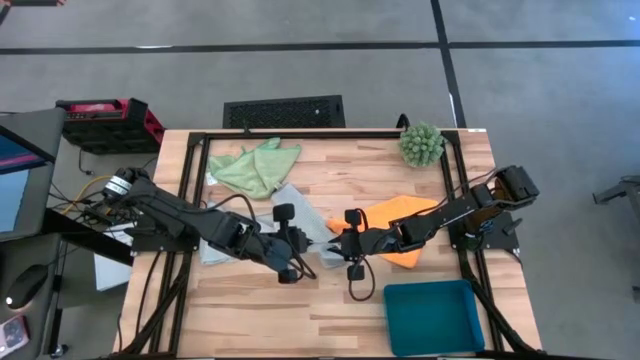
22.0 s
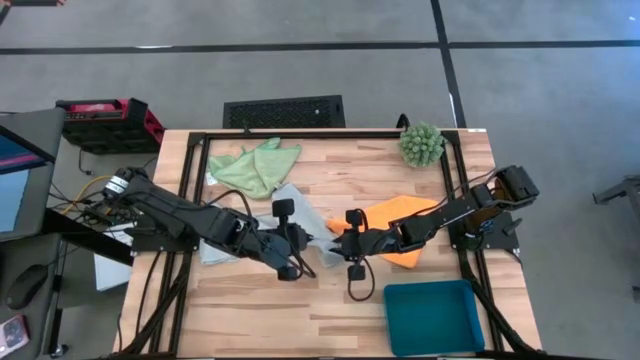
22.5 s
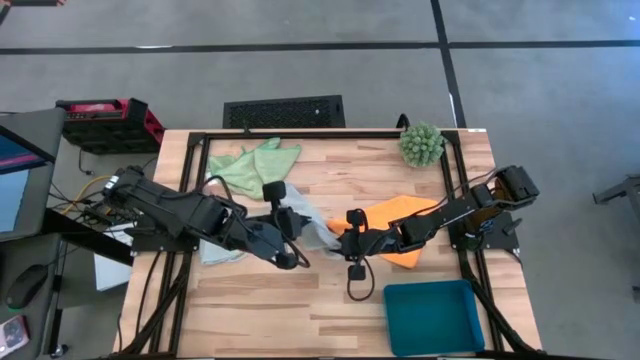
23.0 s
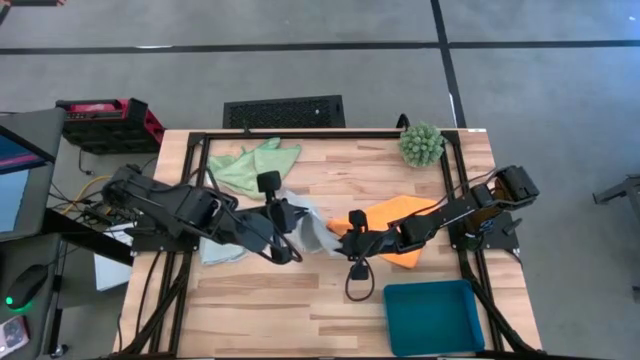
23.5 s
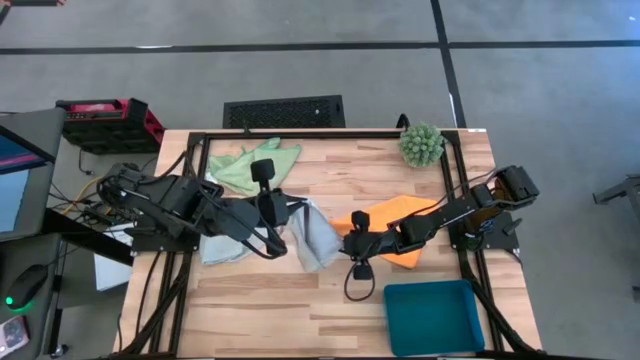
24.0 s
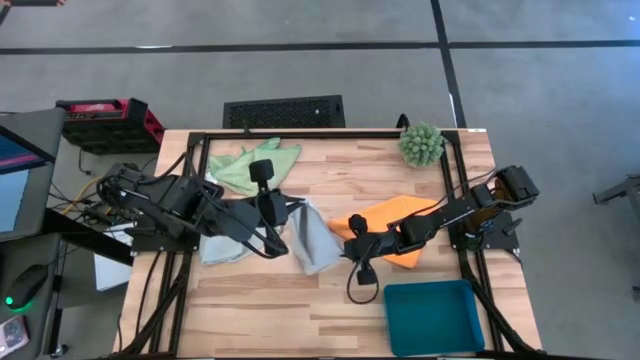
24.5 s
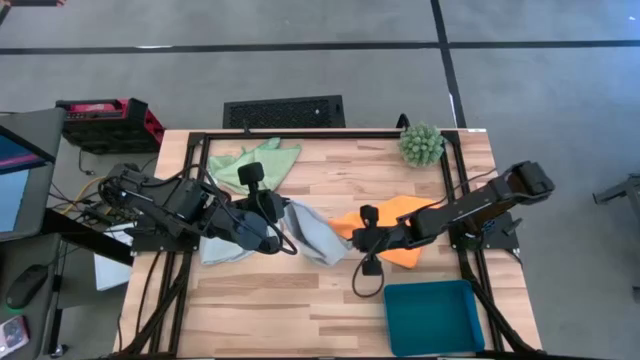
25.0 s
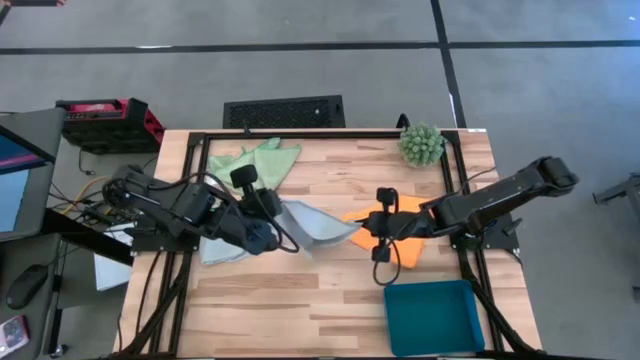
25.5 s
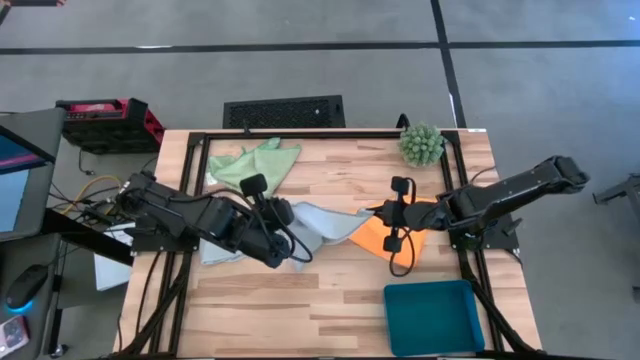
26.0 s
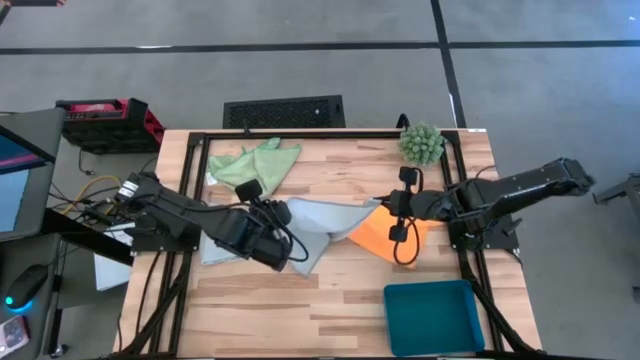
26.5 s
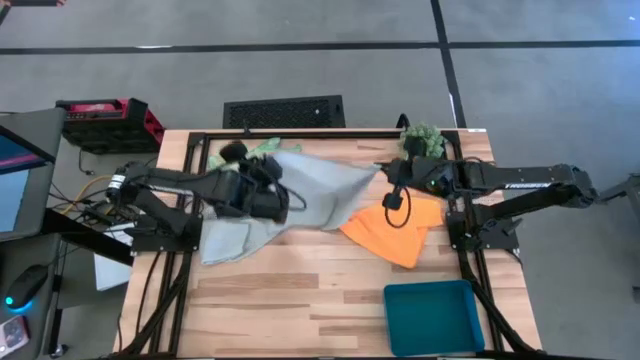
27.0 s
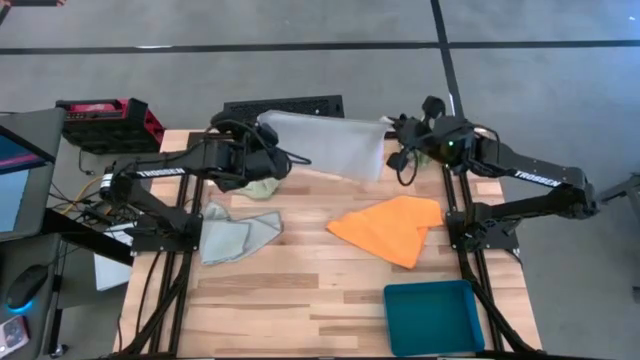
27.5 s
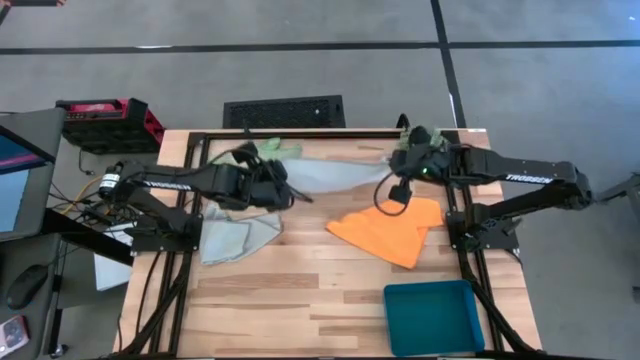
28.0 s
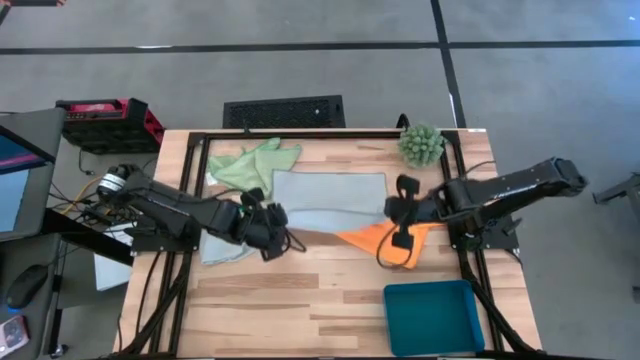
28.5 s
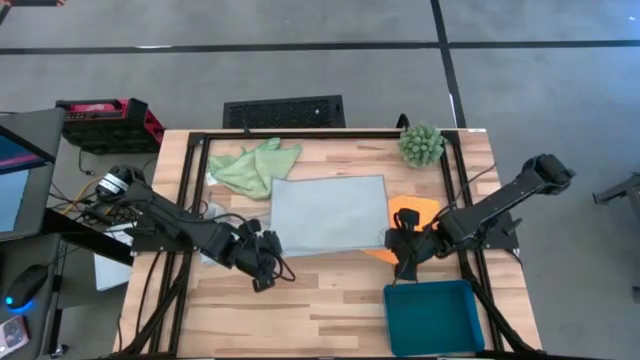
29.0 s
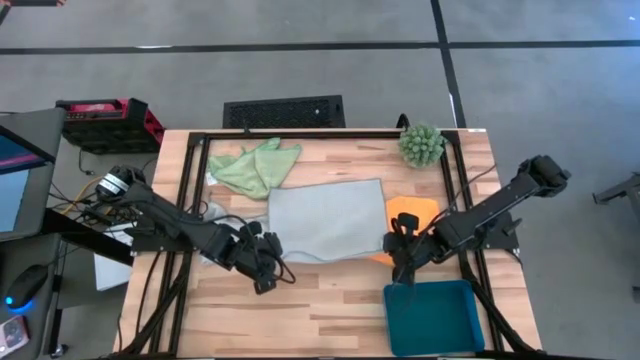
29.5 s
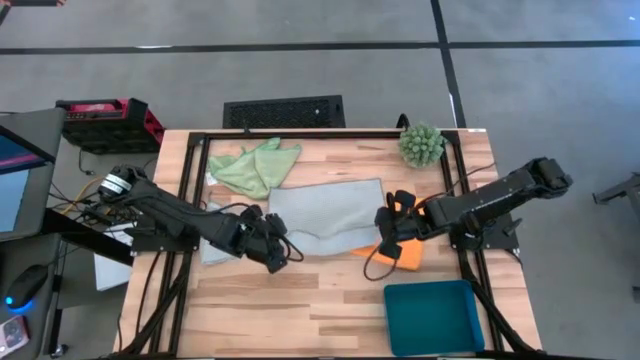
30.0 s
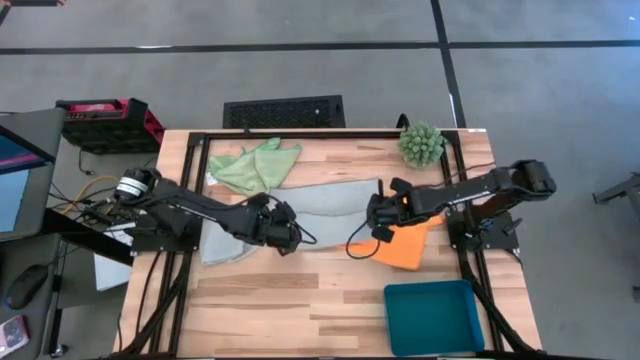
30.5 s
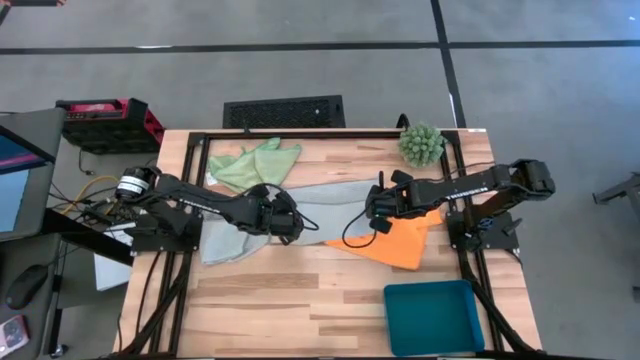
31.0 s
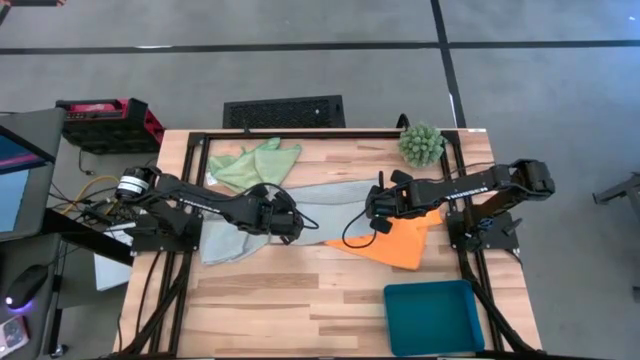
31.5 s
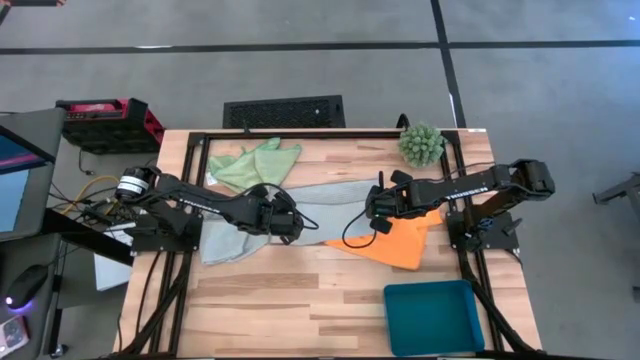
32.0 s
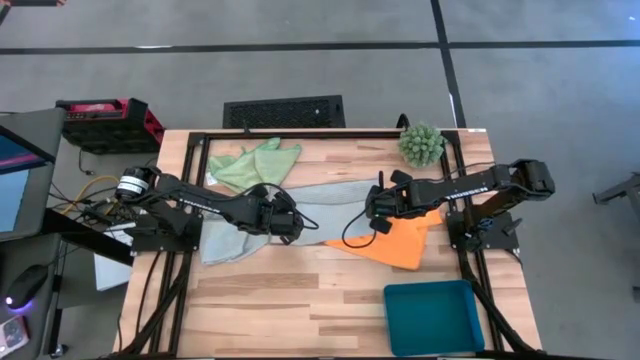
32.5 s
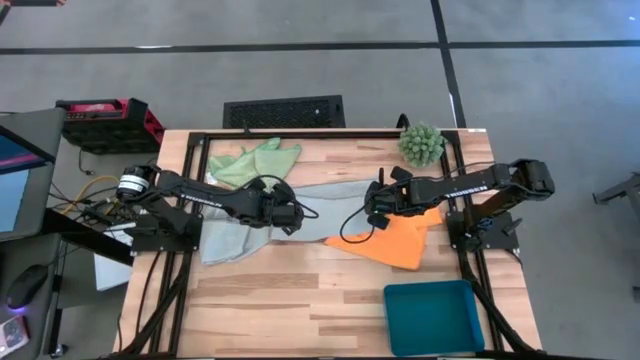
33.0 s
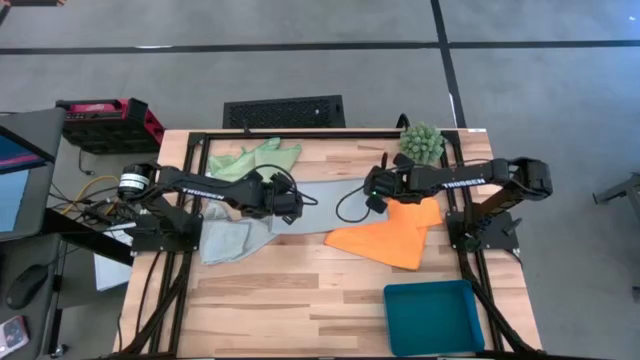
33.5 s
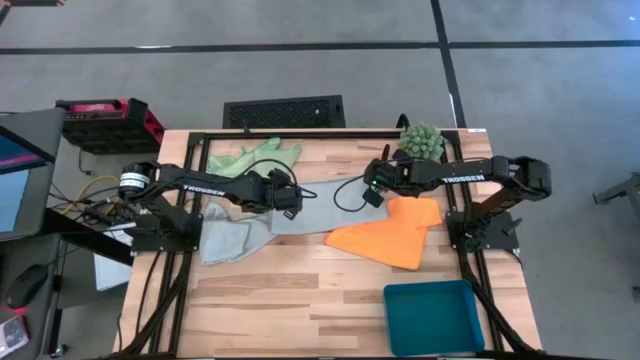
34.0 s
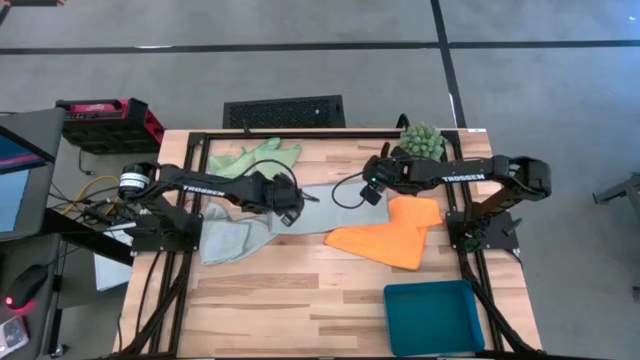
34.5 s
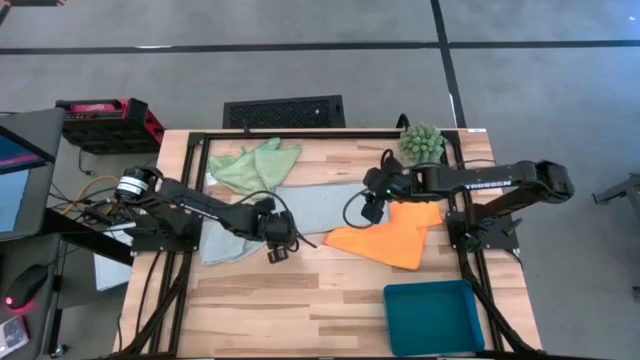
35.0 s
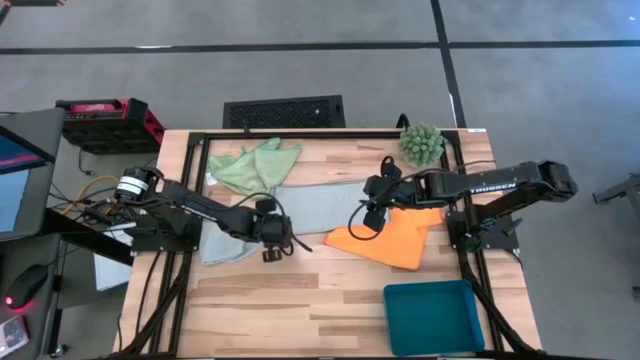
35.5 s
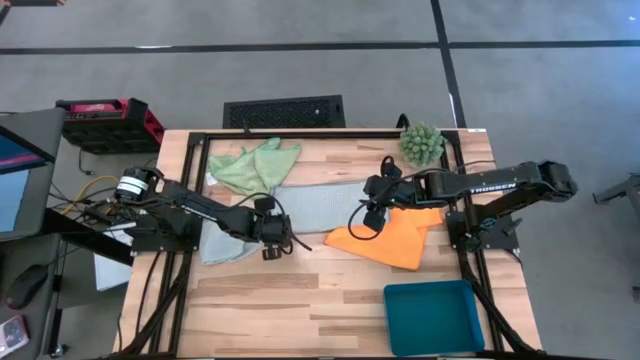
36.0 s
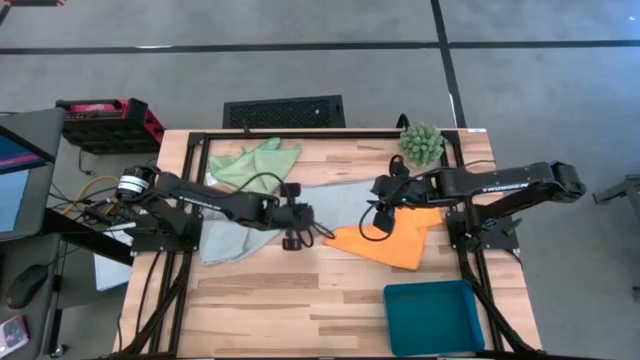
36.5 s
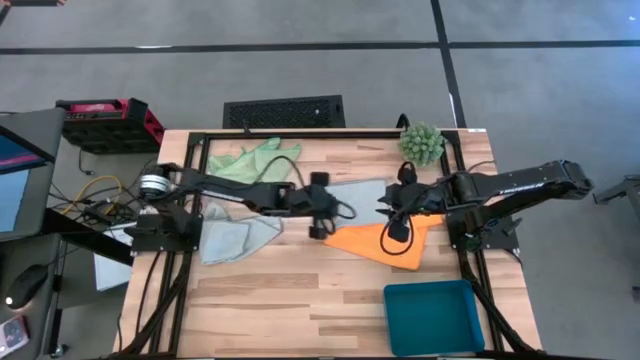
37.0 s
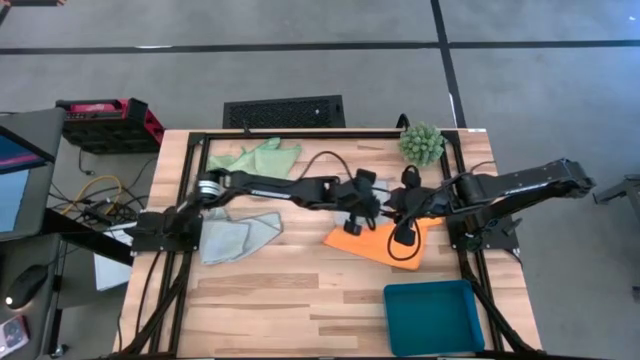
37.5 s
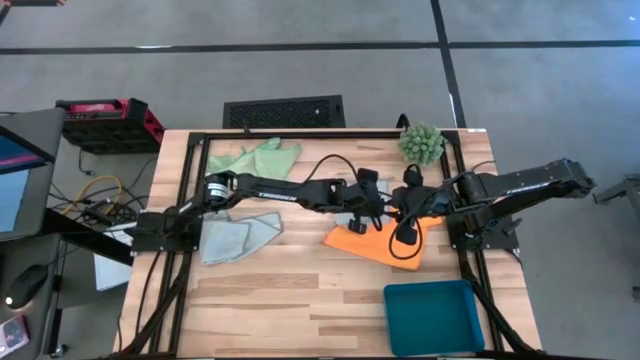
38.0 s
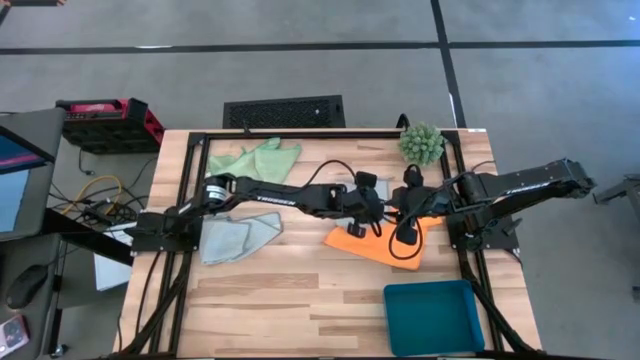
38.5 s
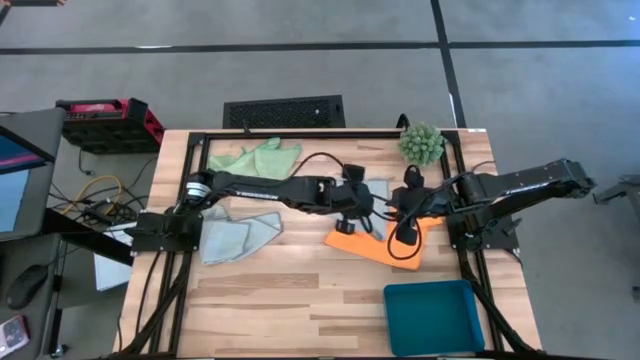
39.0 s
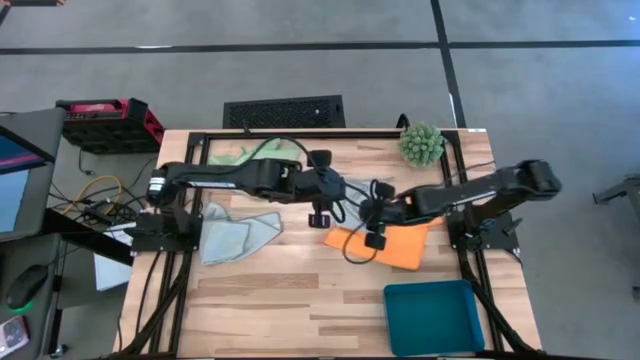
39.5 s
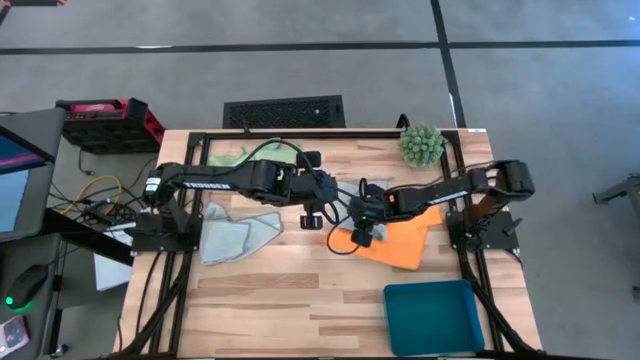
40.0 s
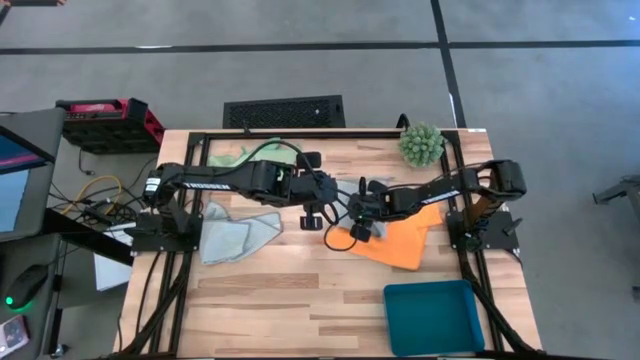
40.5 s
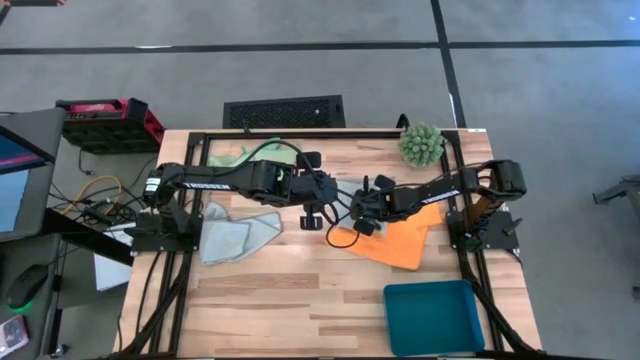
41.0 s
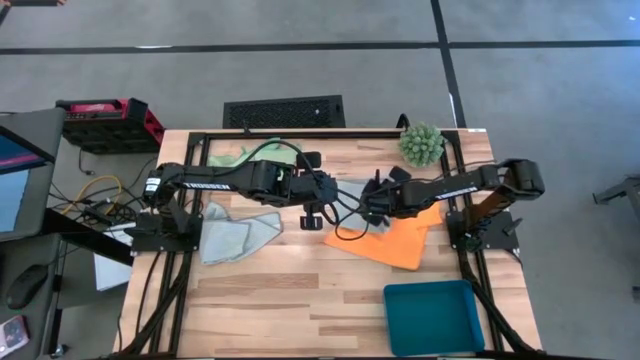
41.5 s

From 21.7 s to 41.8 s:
Task: Fold microfiber towels
Fold the bottom gray towel

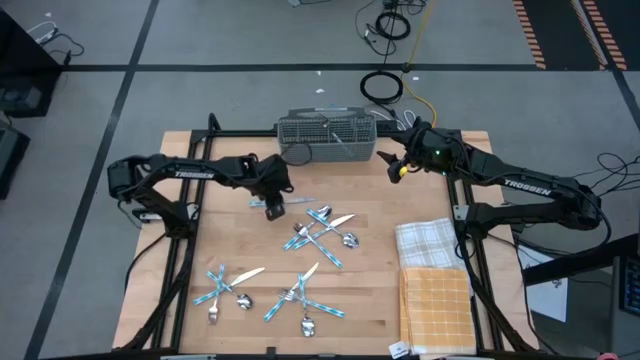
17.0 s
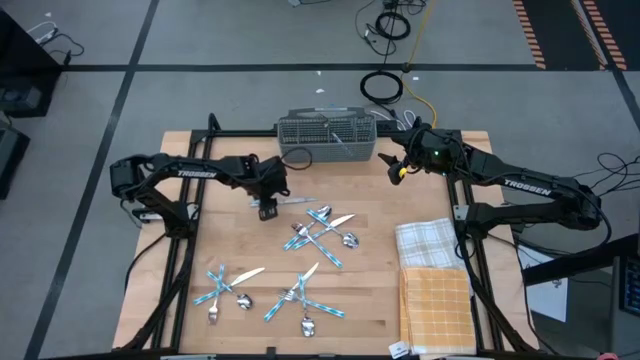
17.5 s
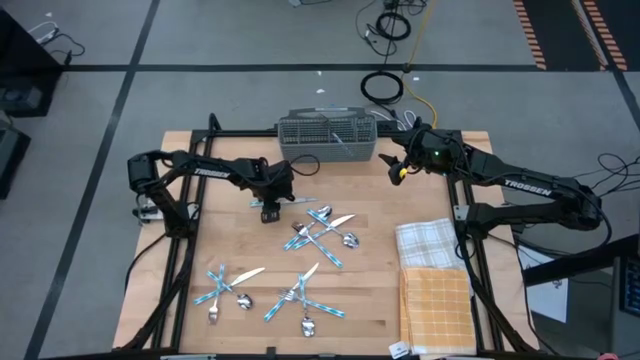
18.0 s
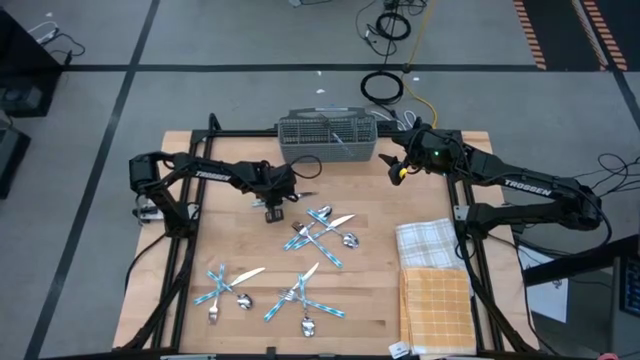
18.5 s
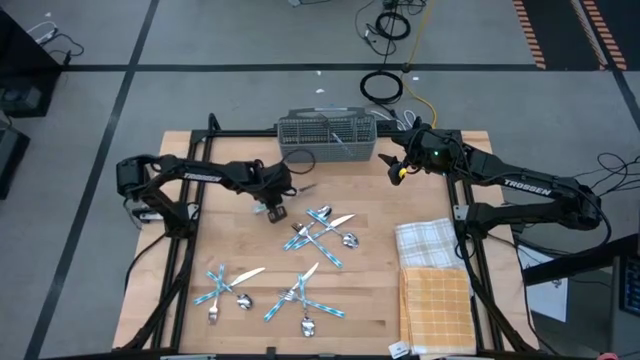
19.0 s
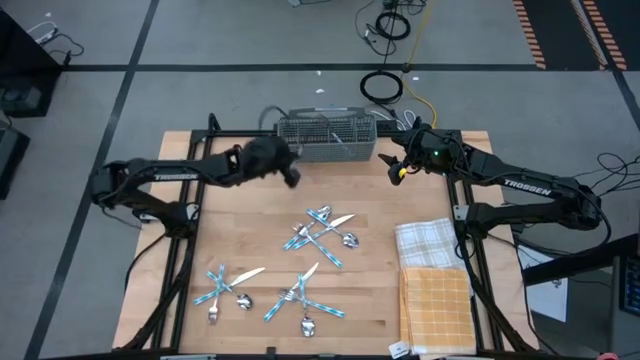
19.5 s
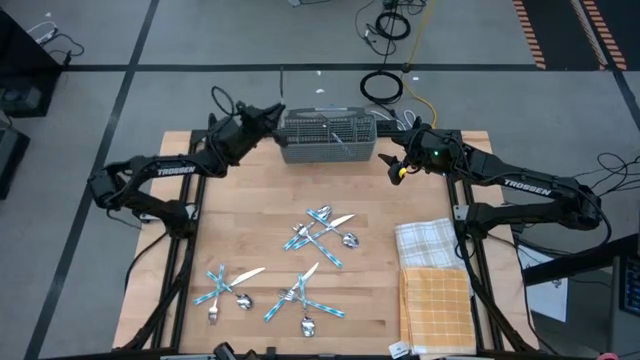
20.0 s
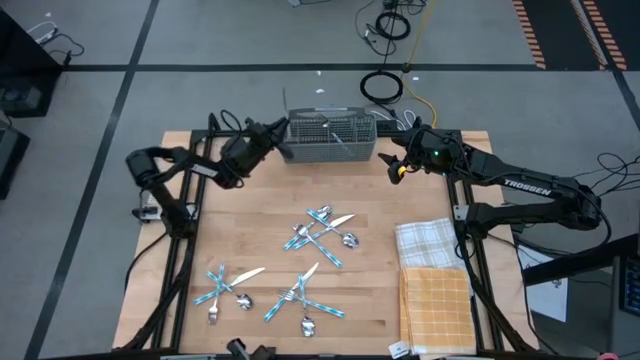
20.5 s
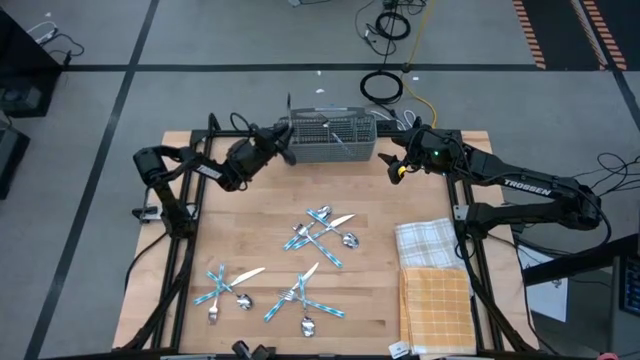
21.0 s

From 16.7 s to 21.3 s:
Task: Sort silverware
Put the table knife into the silverware rack
